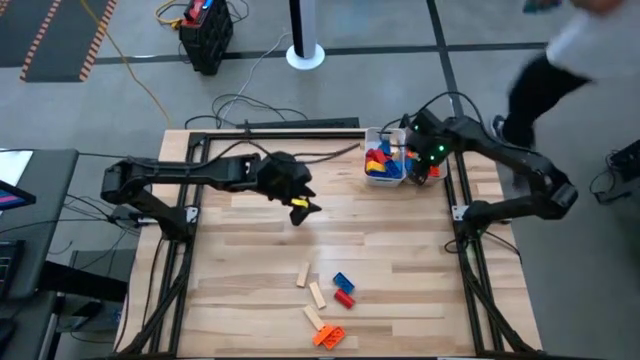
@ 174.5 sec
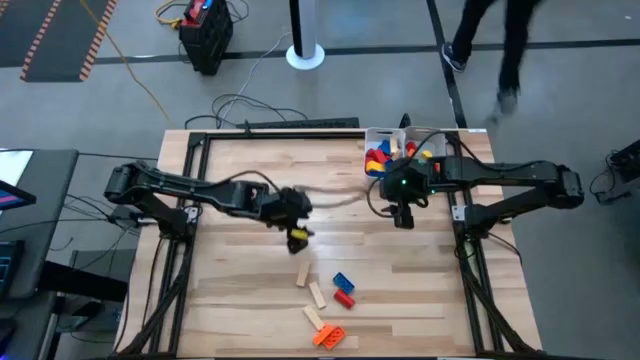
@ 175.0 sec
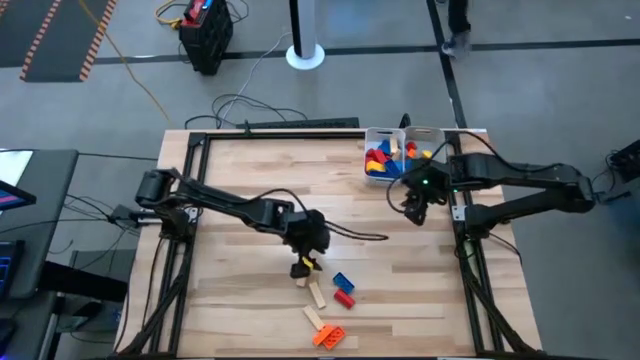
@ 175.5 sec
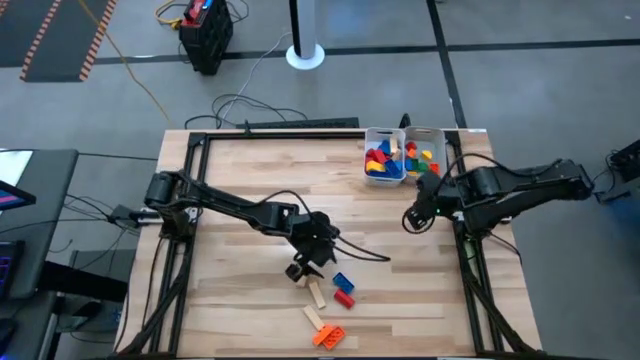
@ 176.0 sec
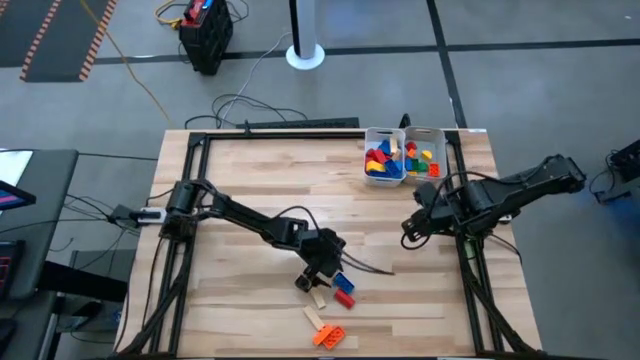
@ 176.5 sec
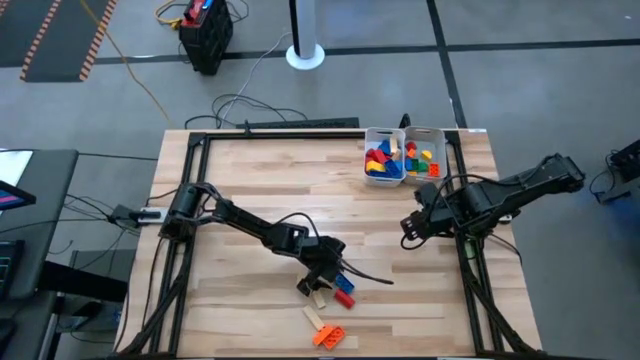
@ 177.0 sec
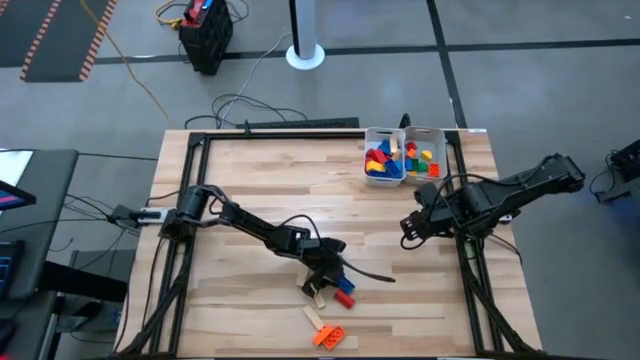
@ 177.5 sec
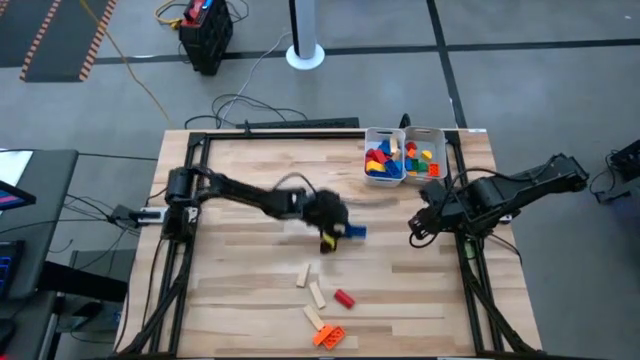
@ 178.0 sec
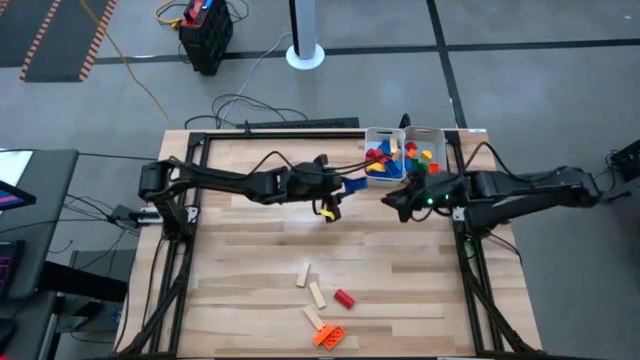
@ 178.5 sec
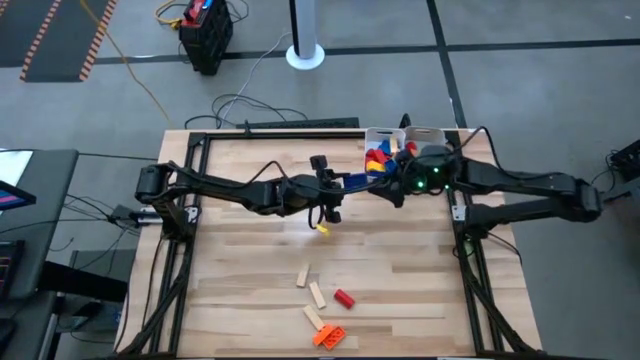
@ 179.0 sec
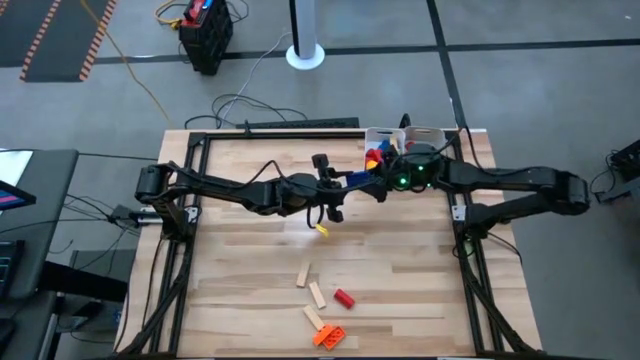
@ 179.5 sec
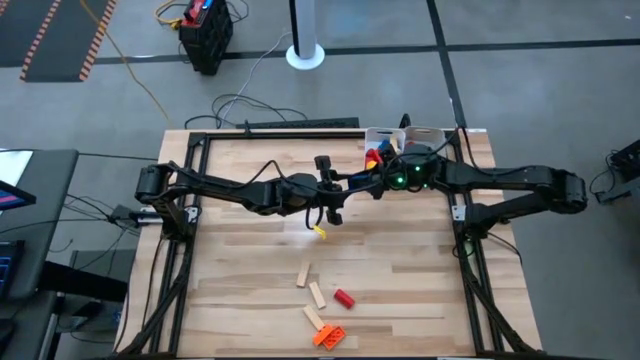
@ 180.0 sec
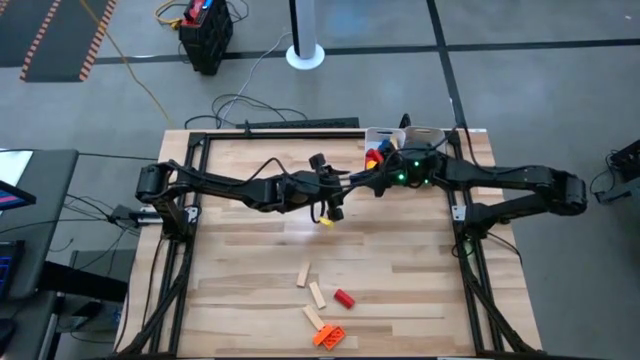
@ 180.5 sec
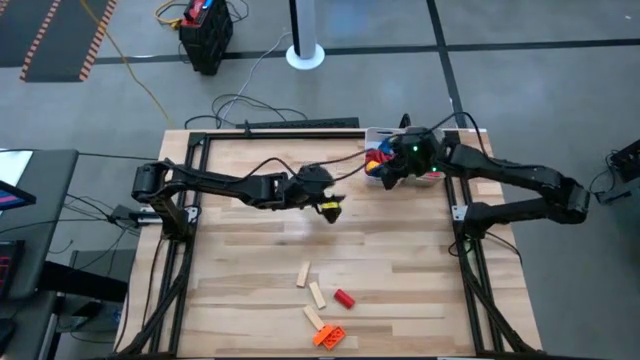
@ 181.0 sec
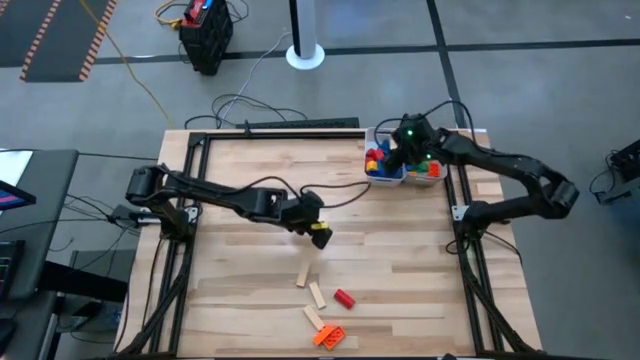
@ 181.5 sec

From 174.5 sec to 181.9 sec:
Task: Sort blocks by size
Put the large blue game piece into the white bin

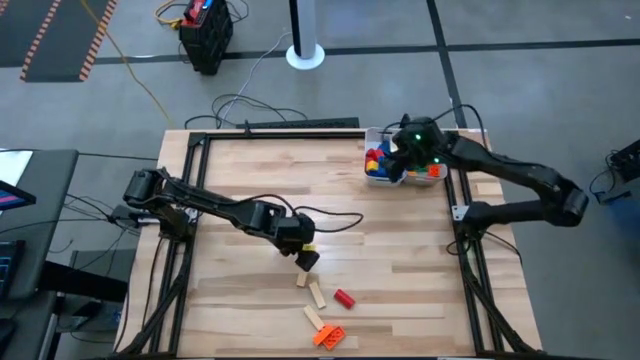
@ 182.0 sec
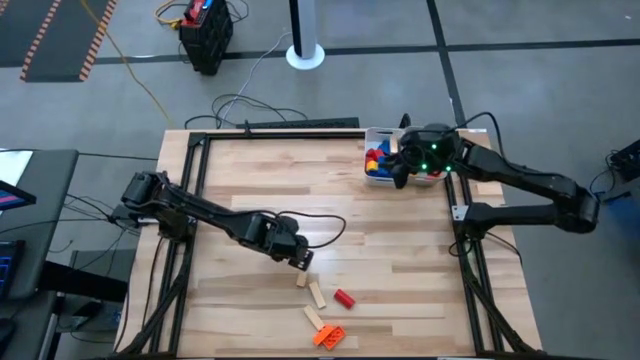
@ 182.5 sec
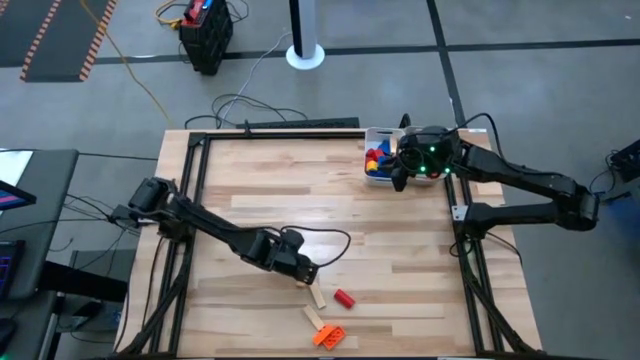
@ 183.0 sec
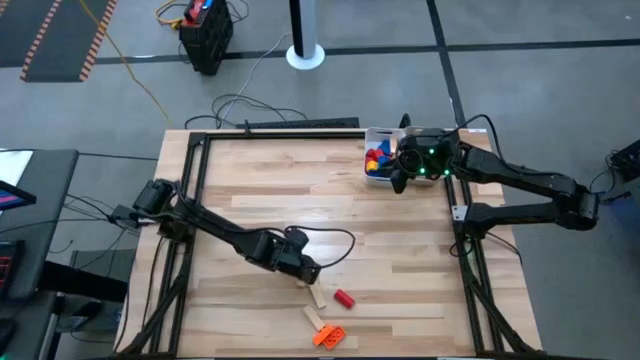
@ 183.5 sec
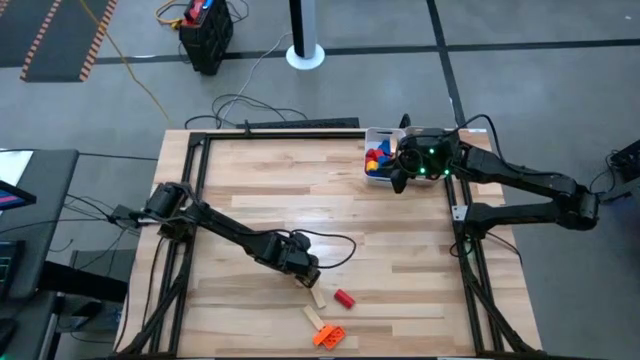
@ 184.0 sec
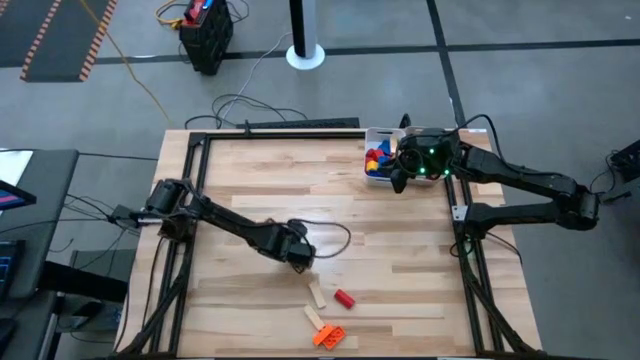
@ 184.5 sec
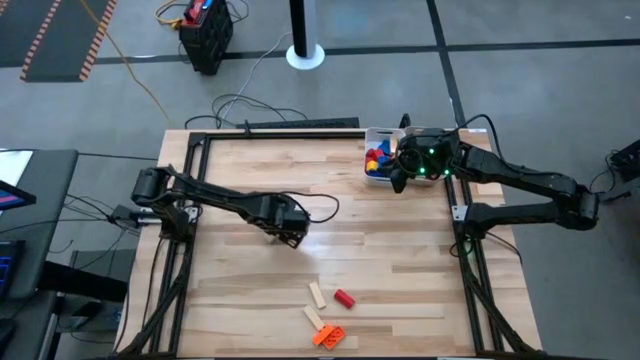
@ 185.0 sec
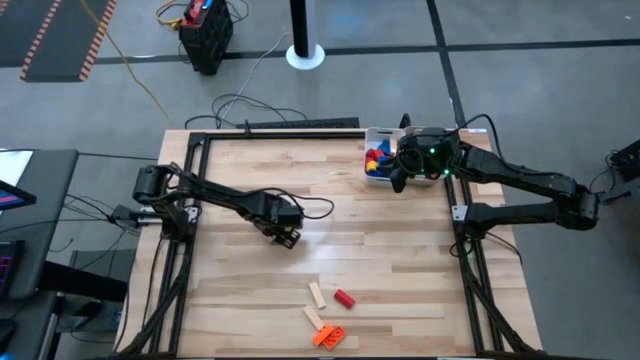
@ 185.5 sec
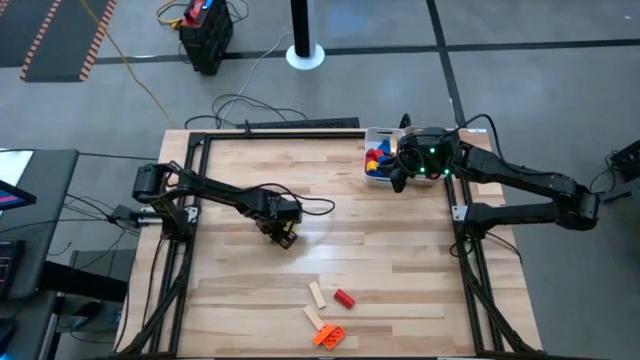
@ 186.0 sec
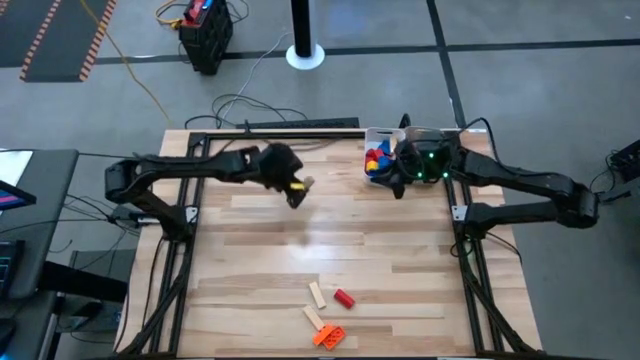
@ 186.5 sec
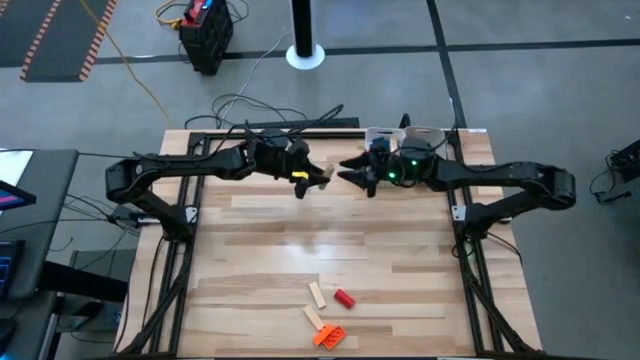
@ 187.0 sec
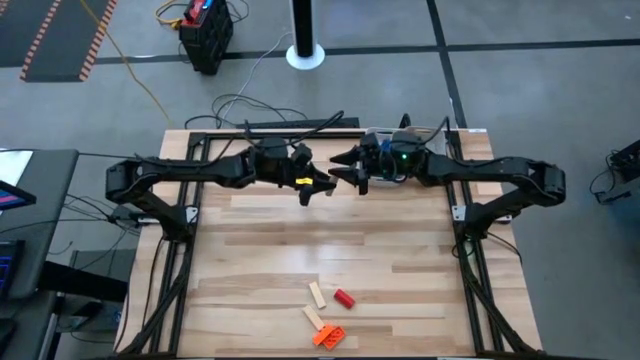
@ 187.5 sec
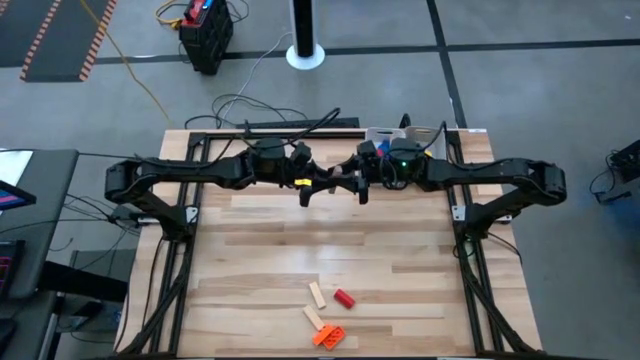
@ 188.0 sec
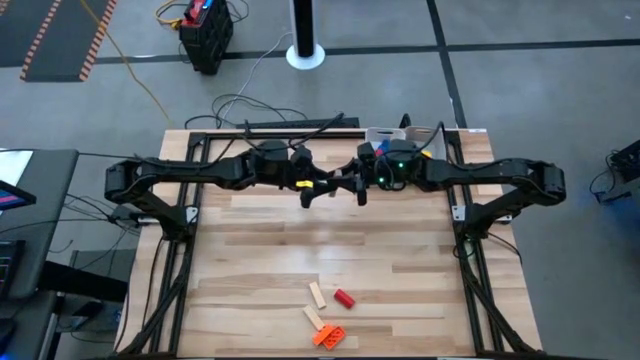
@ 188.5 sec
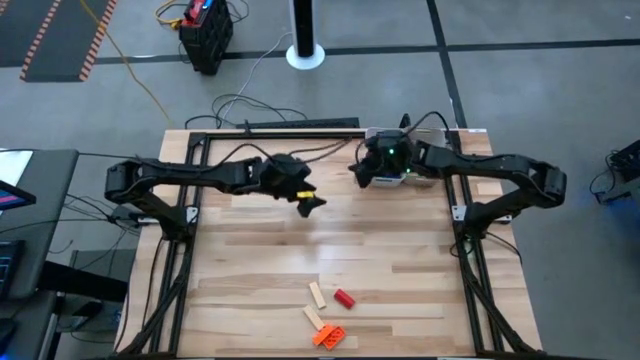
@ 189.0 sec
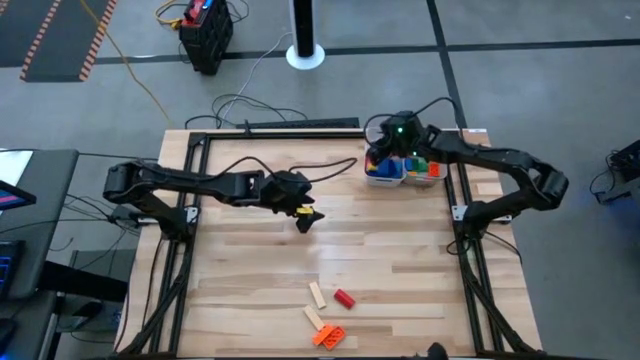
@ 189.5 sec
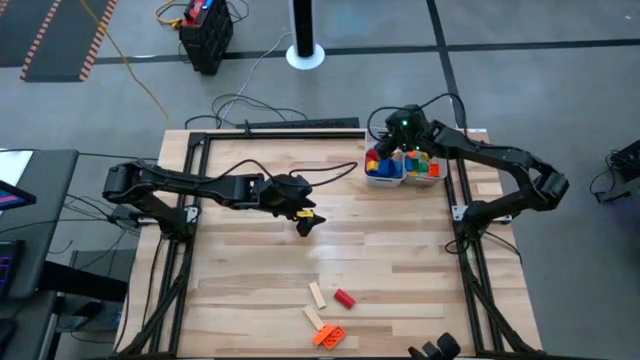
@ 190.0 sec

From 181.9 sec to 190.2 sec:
Put the large beige wooden block into the white bin

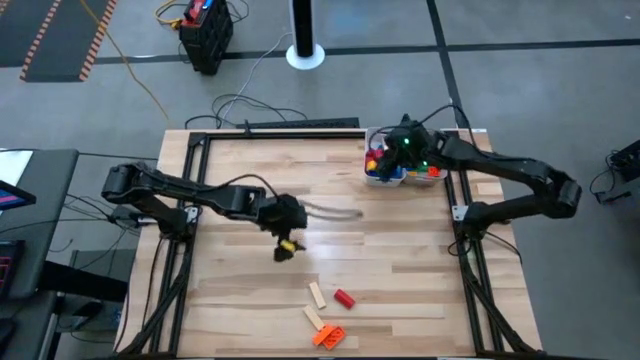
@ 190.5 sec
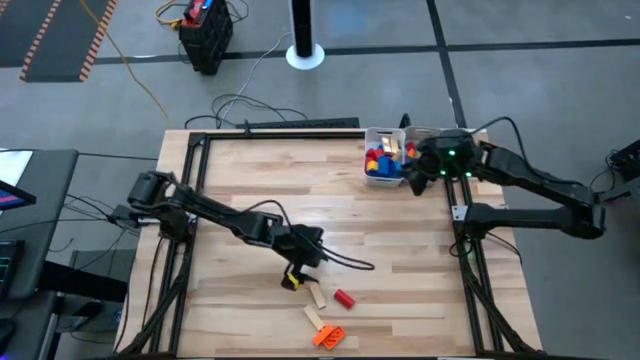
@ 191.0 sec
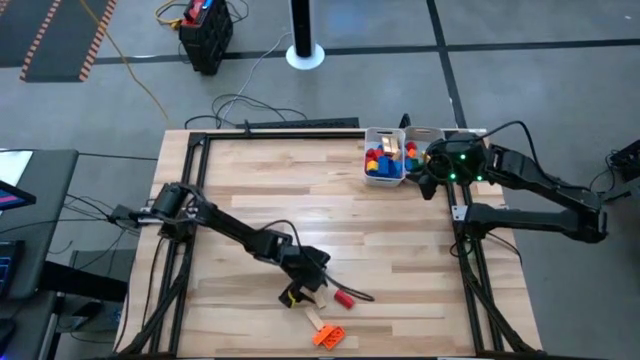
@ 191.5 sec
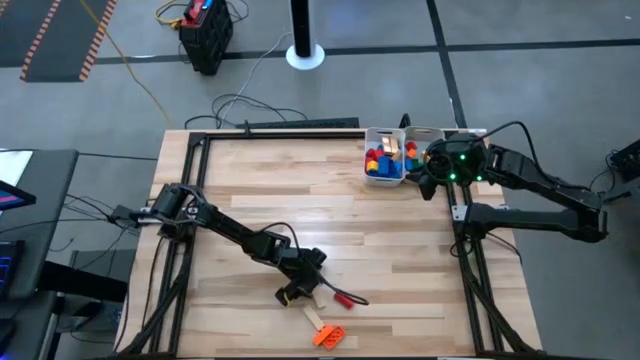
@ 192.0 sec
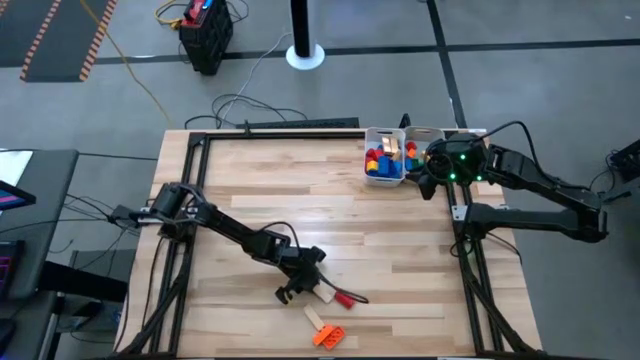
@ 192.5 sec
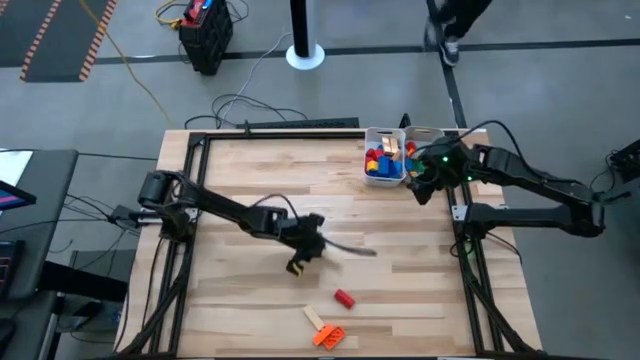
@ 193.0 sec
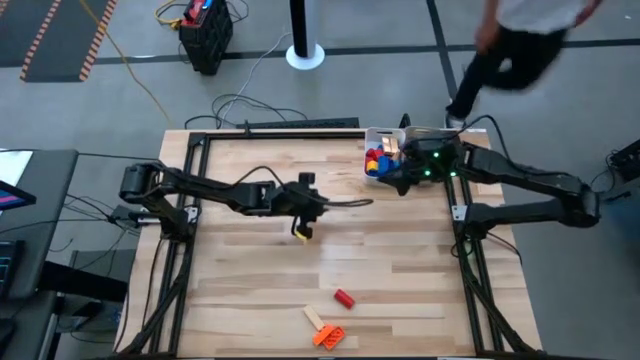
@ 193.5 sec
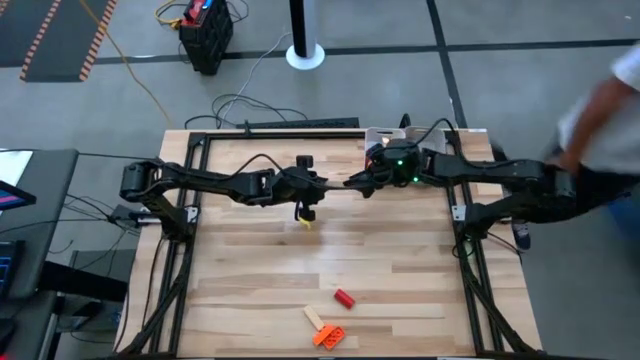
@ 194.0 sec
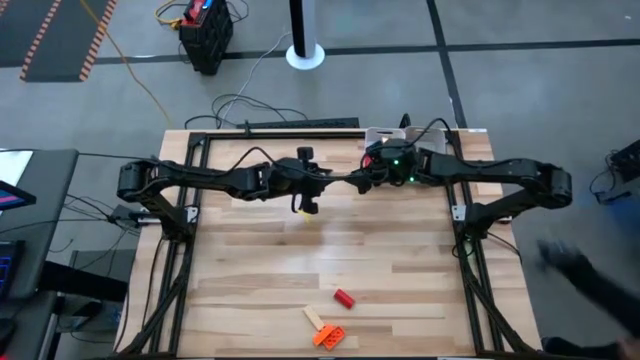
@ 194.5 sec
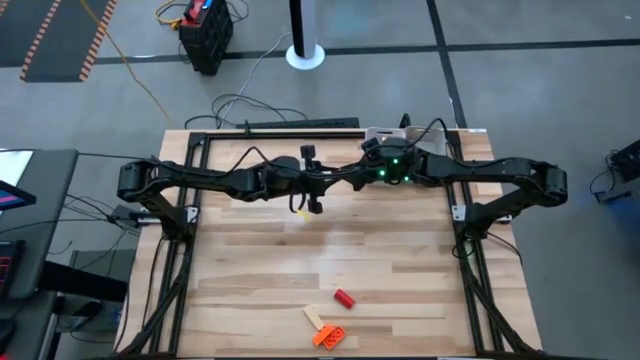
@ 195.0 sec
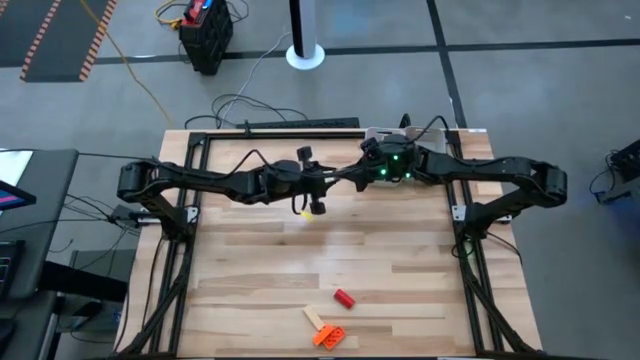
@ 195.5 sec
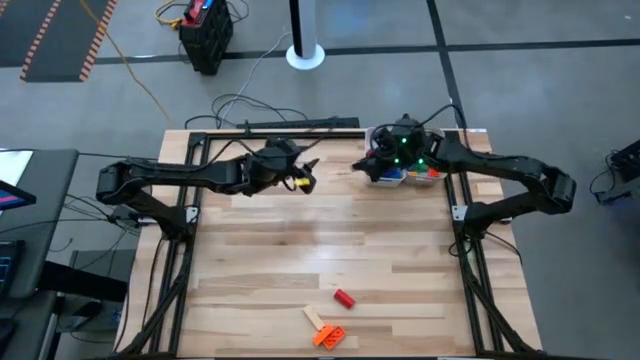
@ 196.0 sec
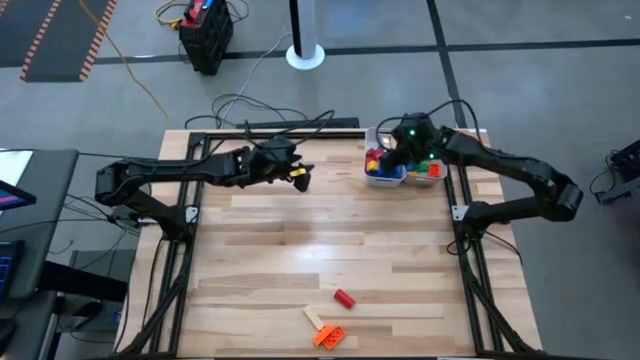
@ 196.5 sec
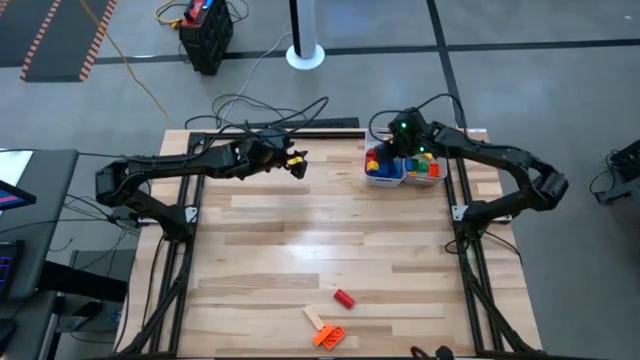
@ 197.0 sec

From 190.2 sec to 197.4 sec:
Put the large beige wooden block into the white bin
